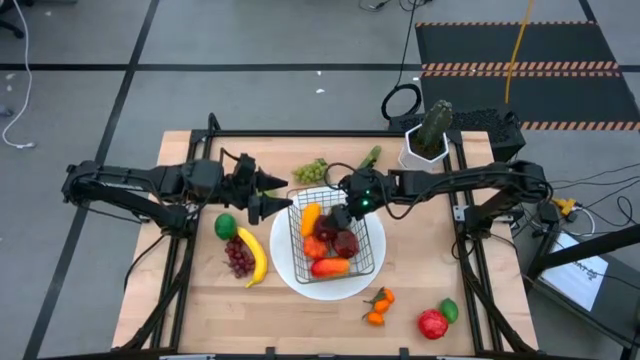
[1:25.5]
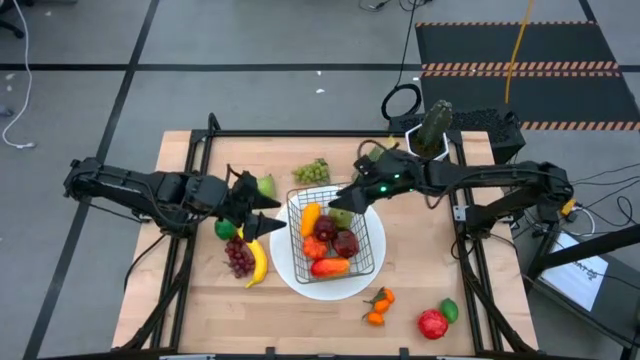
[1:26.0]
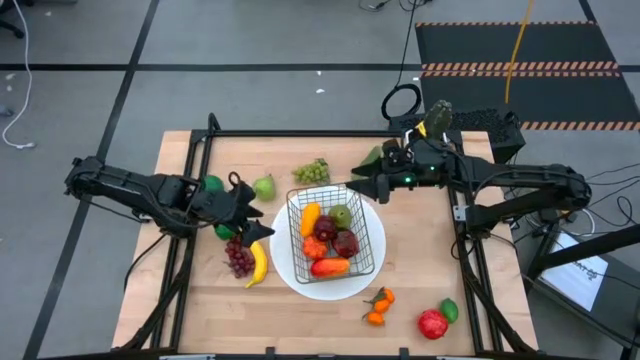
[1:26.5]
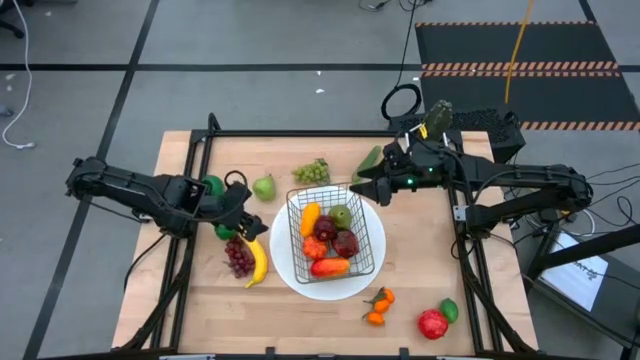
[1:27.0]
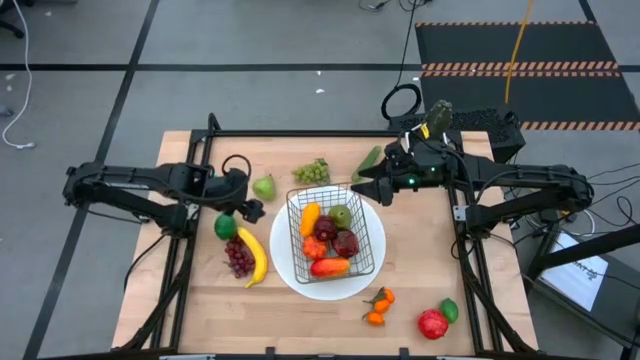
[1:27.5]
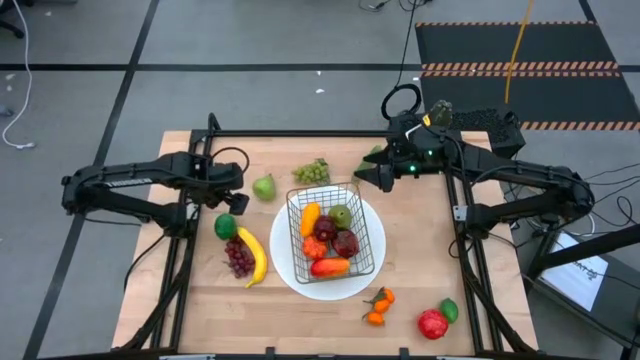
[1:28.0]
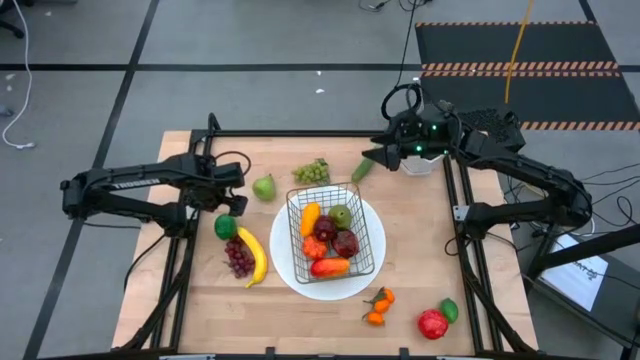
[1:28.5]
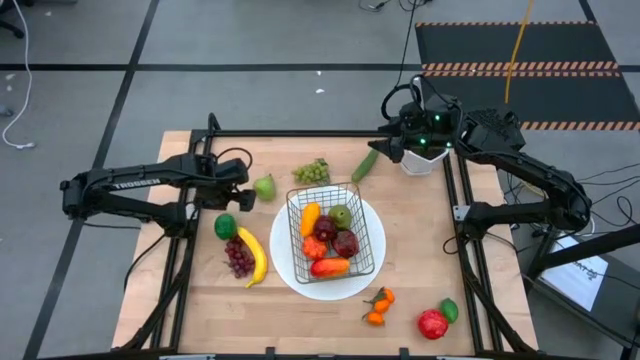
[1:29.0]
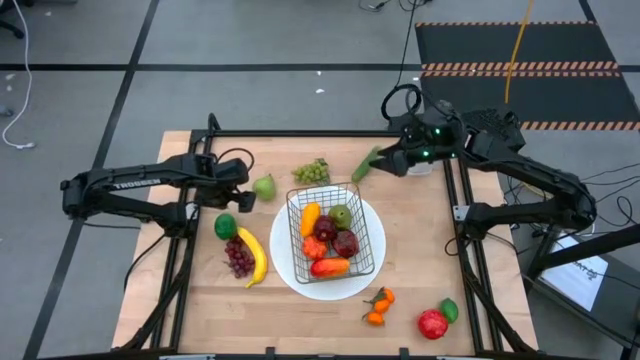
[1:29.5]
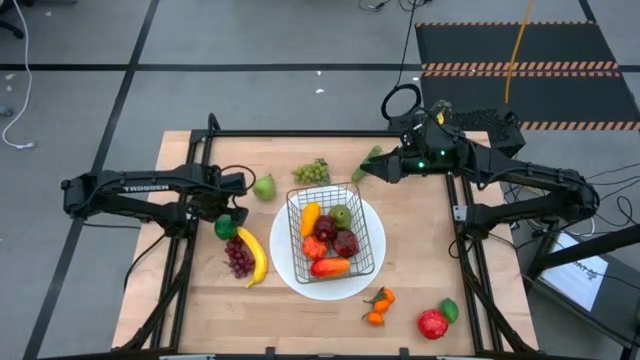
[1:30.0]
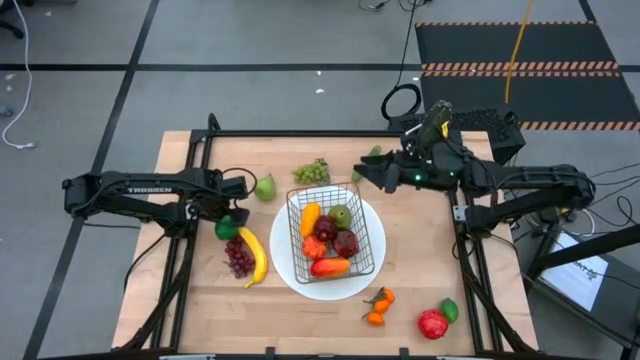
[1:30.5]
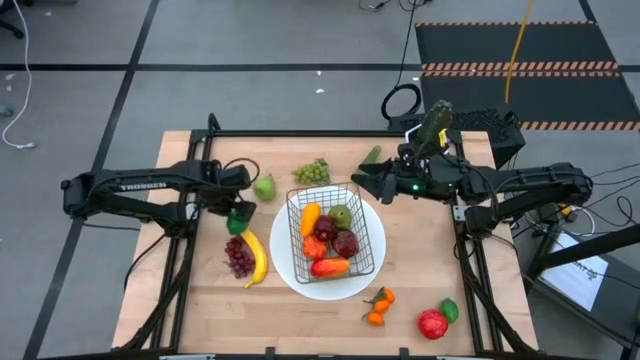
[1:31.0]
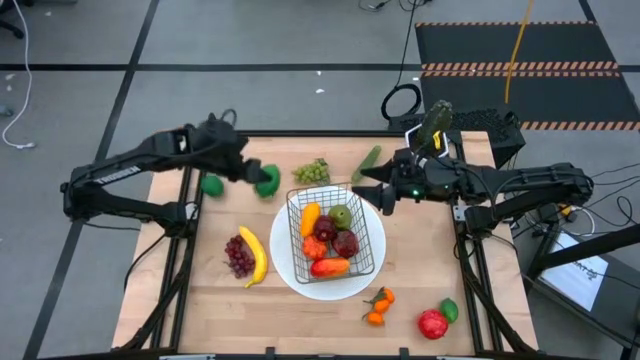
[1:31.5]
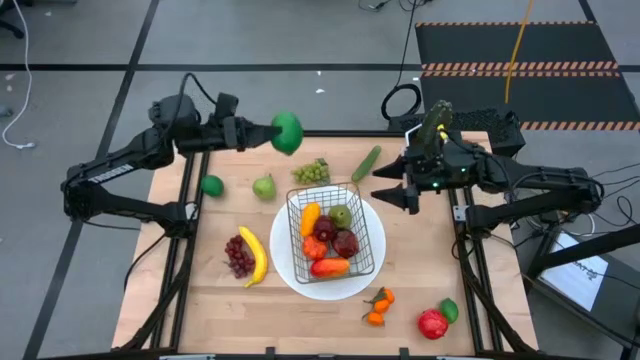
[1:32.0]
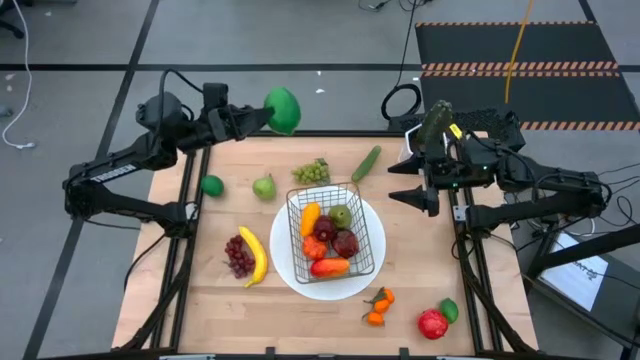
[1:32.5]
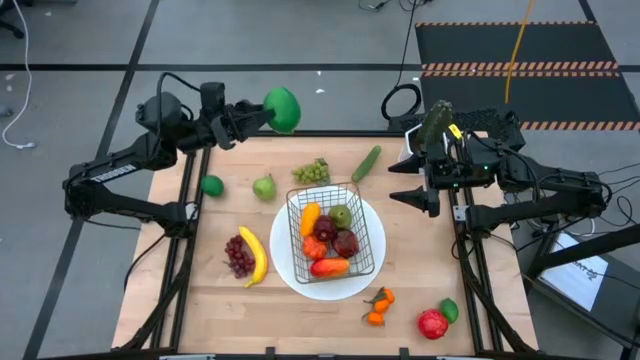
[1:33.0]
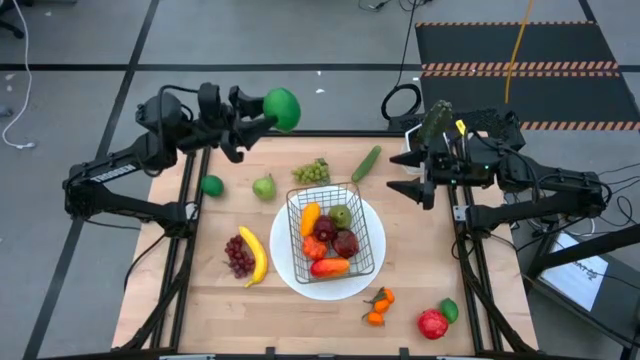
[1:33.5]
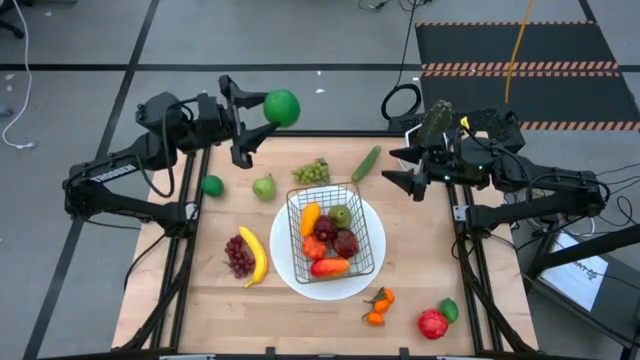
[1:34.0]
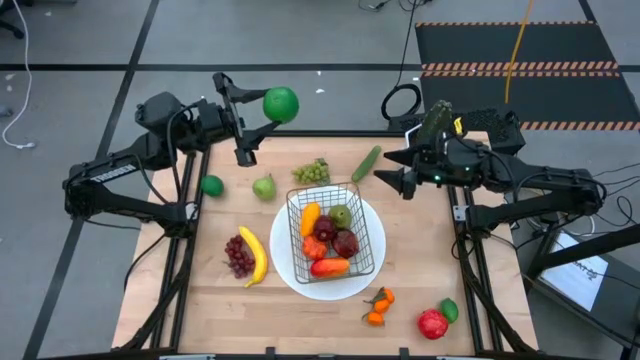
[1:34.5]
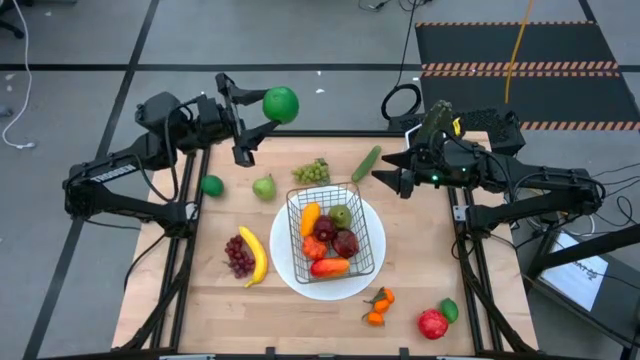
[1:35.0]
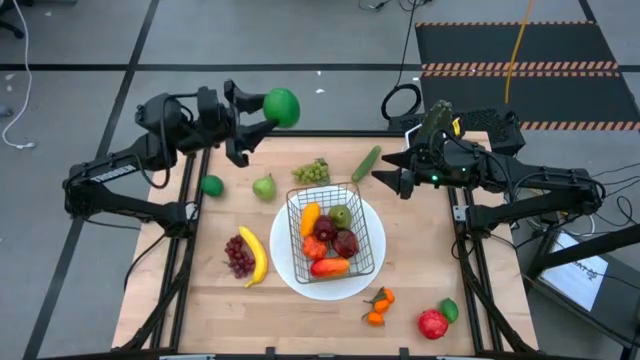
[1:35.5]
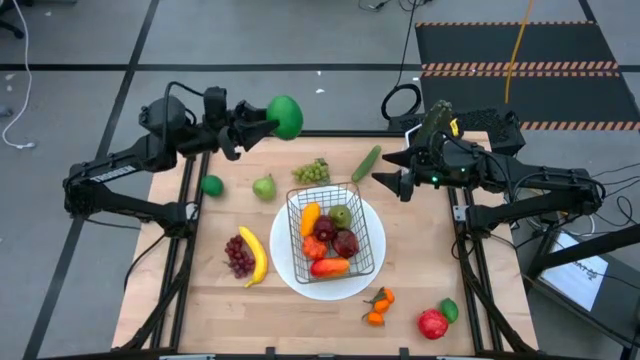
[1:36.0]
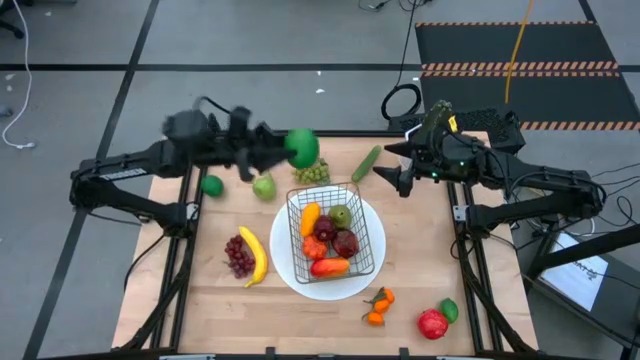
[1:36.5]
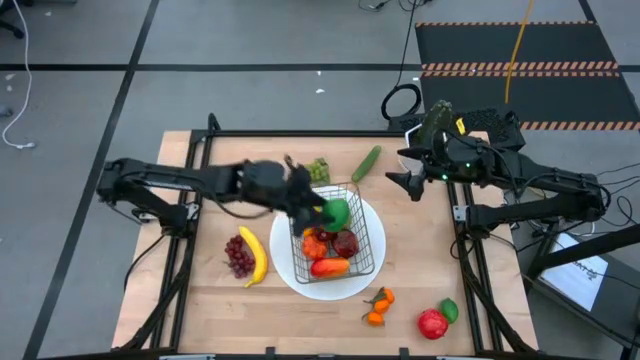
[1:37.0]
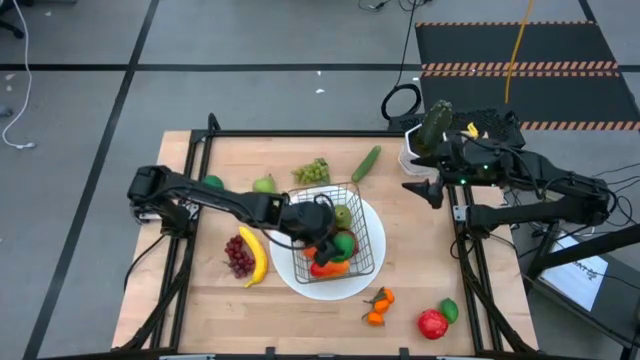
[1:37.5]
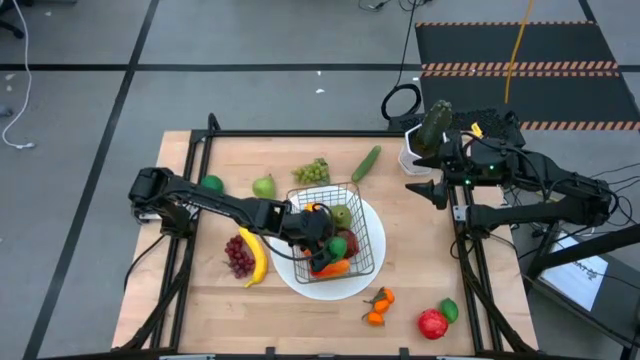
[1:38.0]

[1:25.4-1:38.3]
Task: Build produce basket
Put the bottom left green lime into the black wire basket

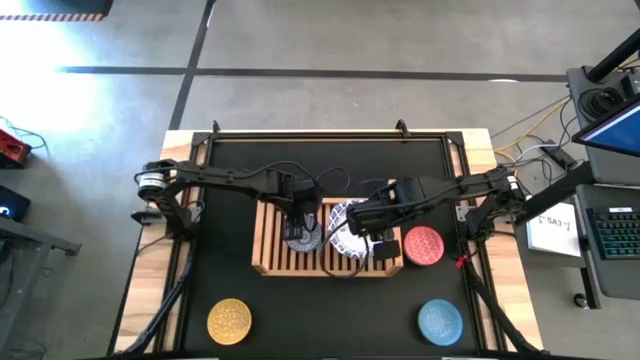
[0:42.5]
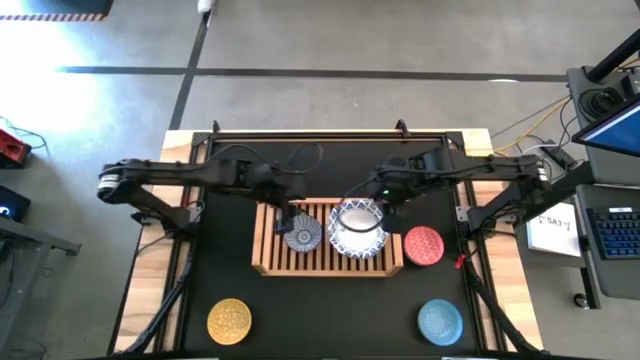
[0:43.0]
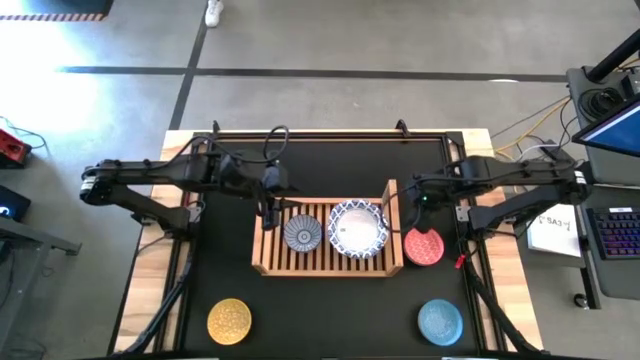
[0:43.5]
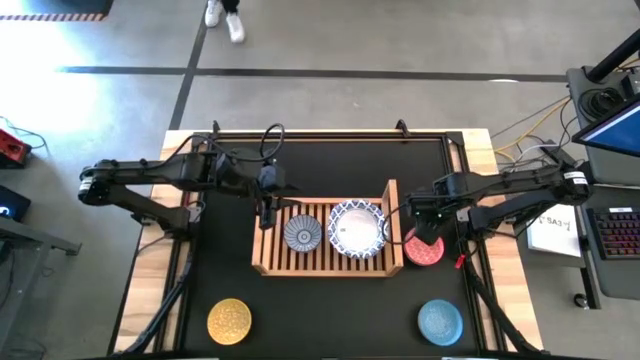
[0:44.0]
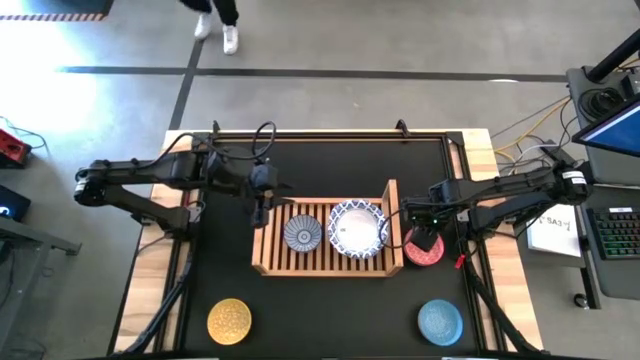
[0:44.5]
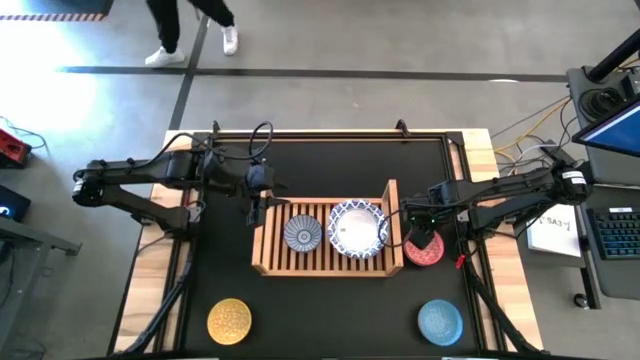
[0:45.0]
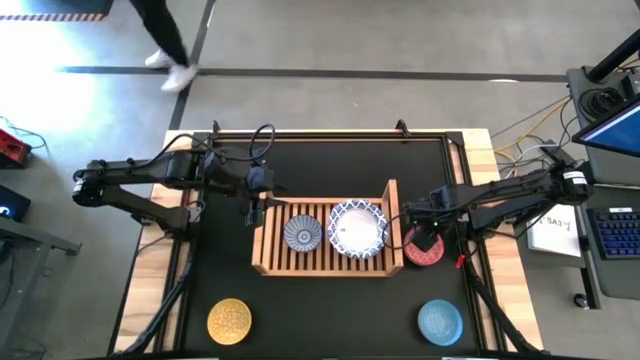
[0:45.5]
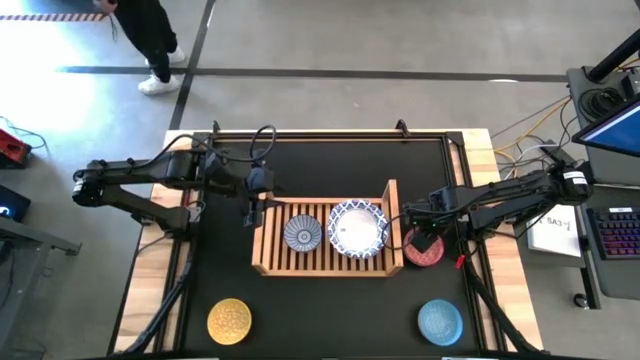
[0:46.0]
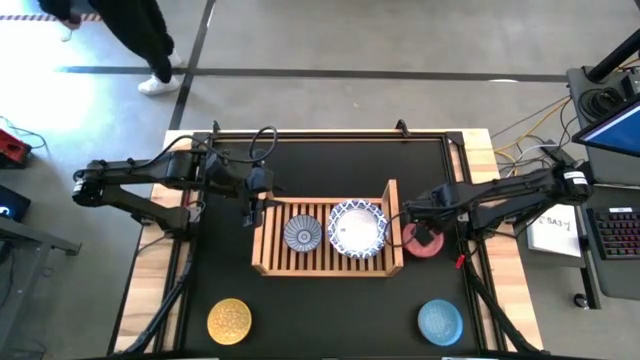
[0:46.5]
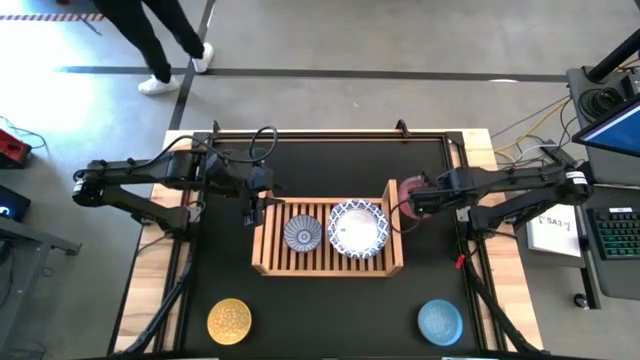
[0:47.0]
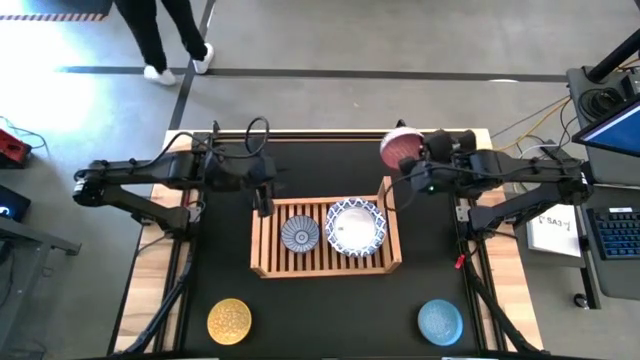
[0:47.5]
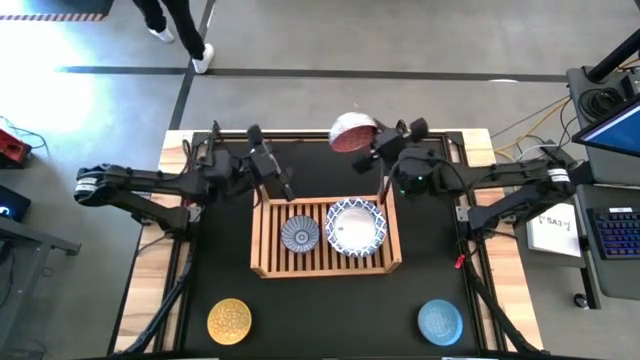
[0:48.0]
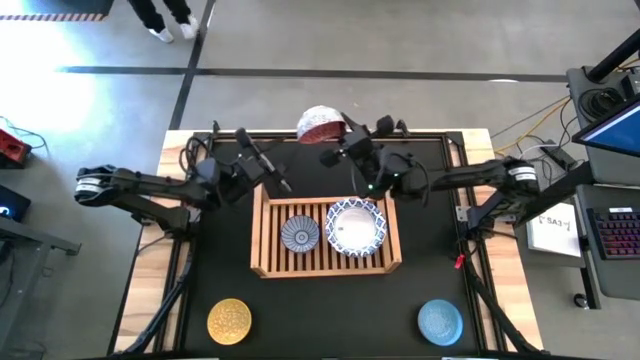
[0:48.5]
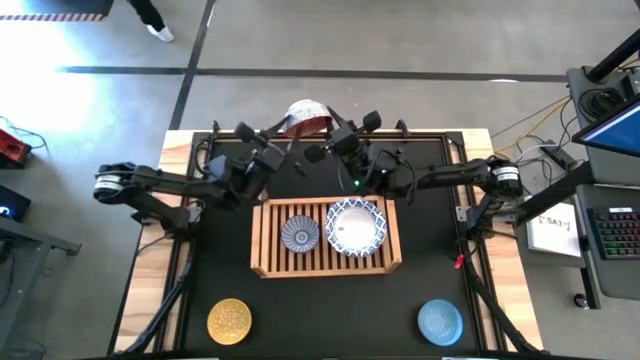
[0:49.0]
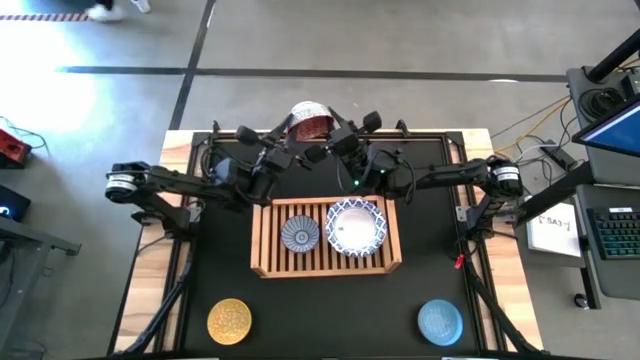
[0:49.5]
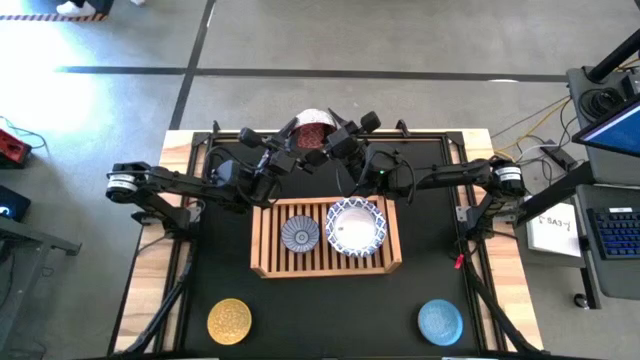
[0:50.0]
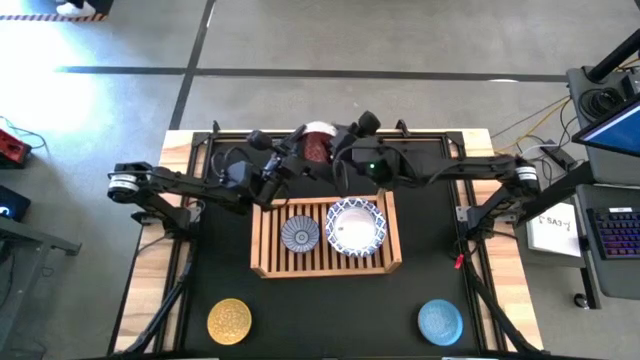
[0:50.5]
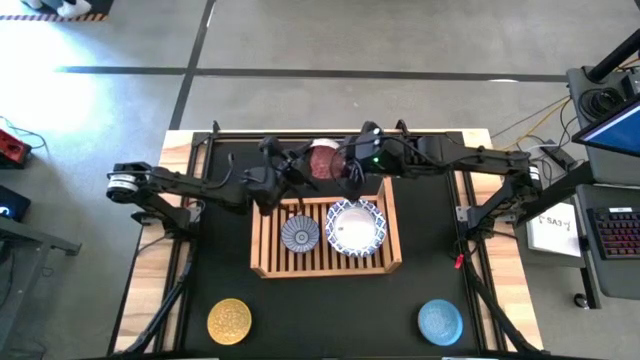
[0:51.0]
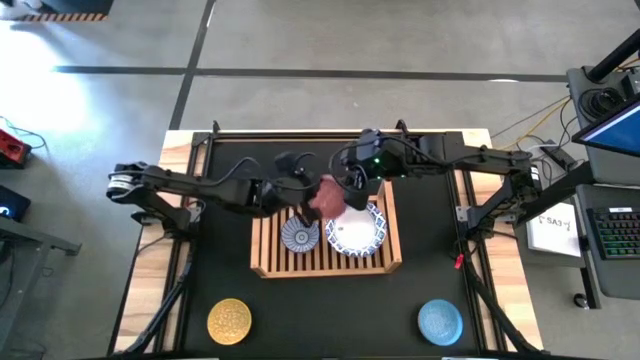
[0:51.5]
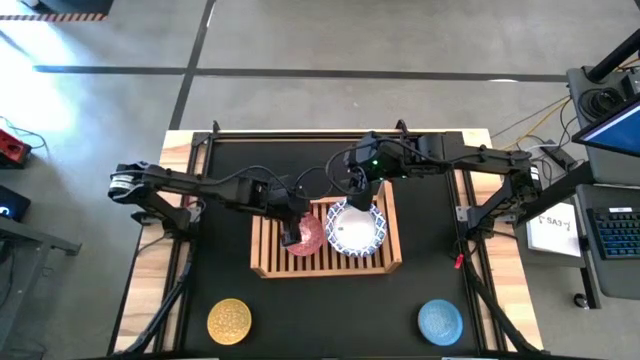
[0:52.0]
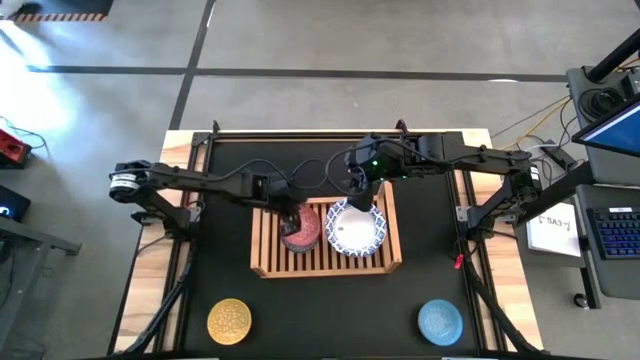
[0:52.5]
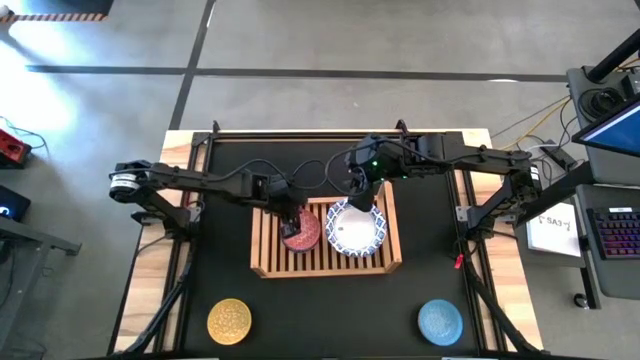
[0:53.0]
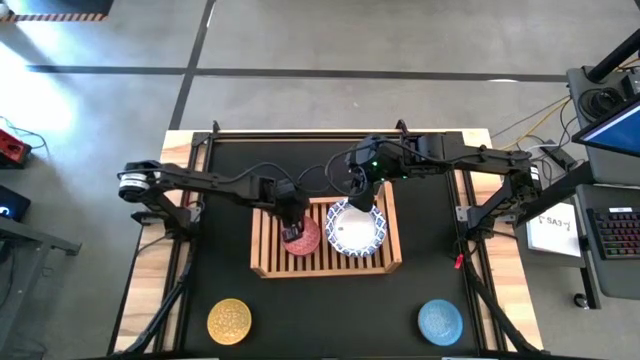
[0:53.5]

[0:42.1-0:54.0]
Task: Place and stack bowls onto a shelf
Stack the red patterned bowl on top of the dark blue patterned bowl on the shelf
